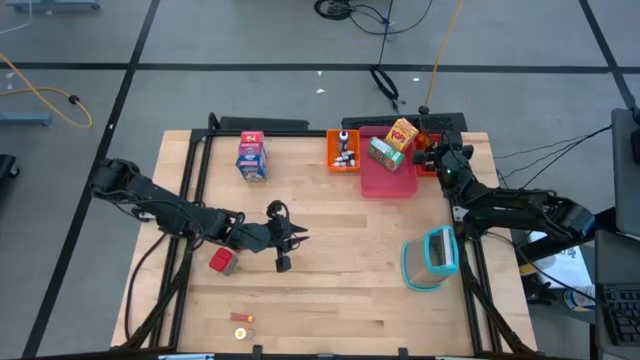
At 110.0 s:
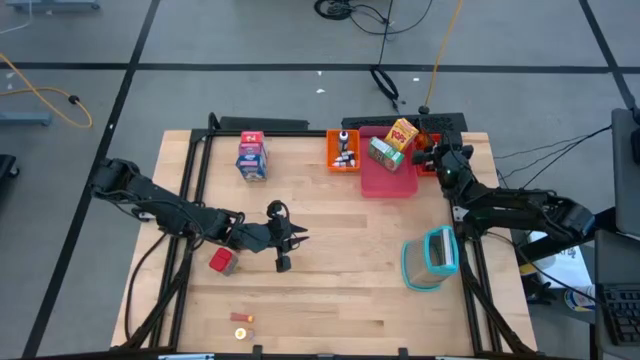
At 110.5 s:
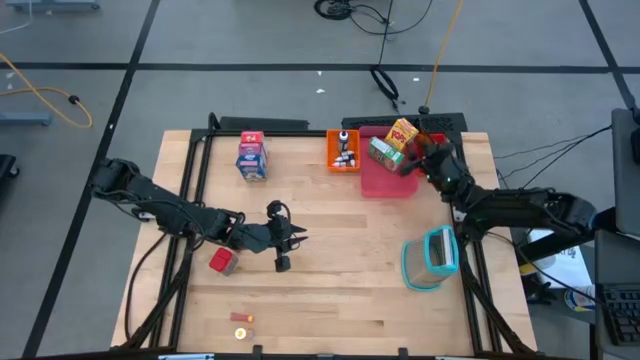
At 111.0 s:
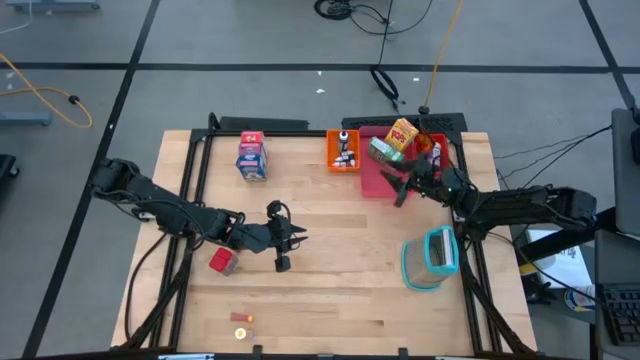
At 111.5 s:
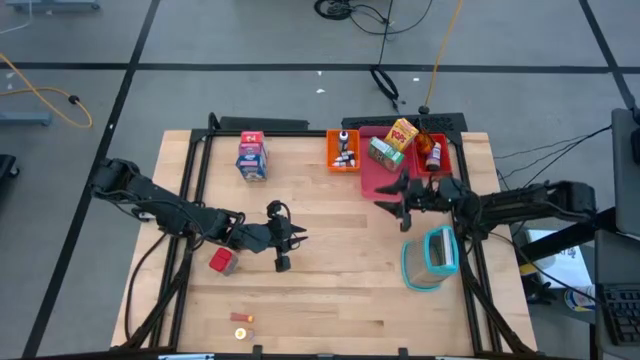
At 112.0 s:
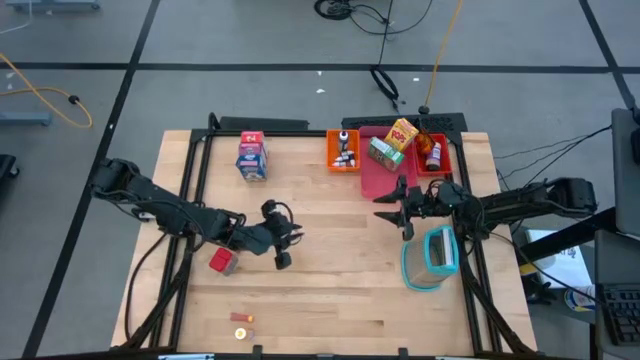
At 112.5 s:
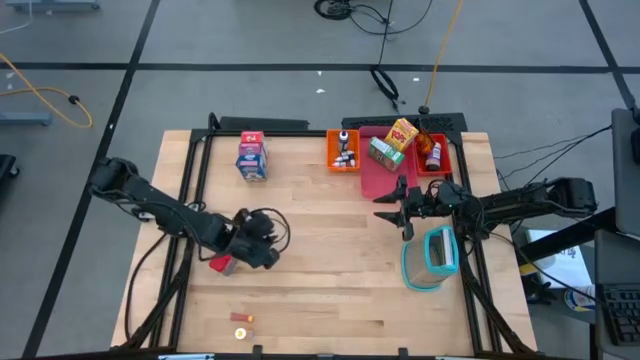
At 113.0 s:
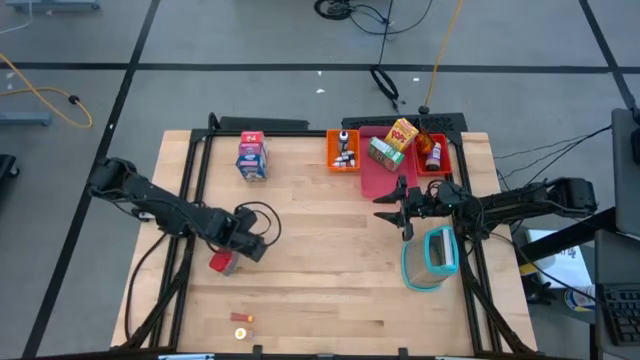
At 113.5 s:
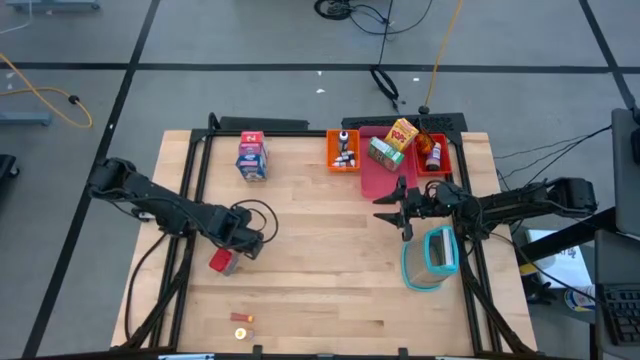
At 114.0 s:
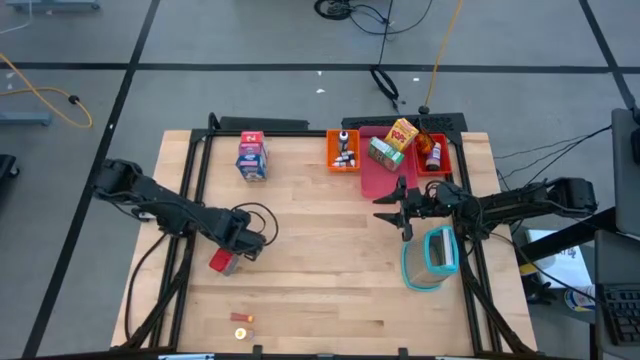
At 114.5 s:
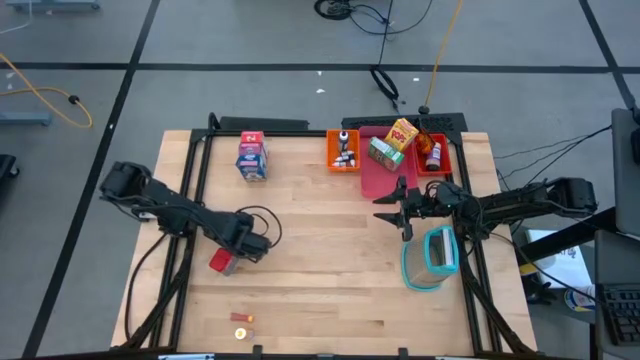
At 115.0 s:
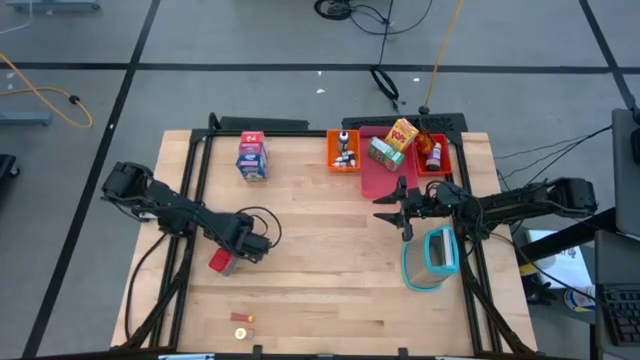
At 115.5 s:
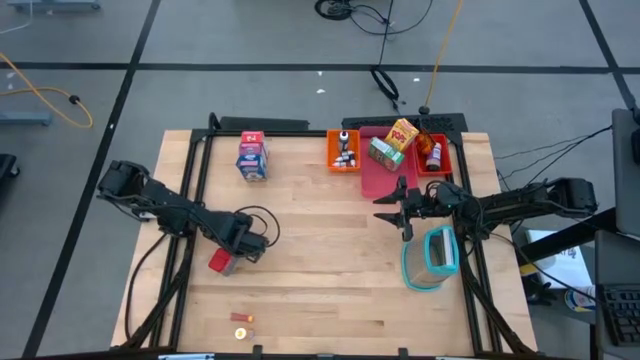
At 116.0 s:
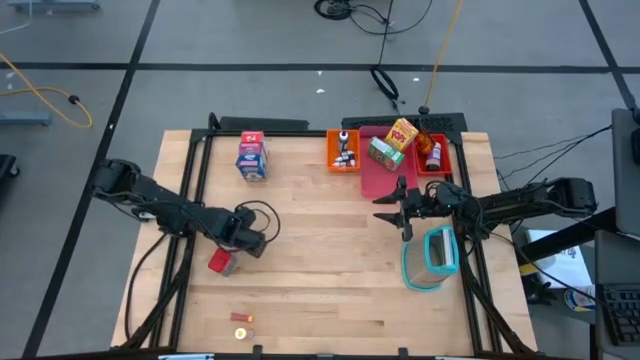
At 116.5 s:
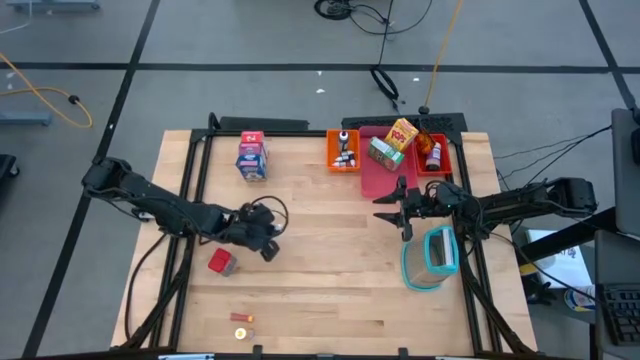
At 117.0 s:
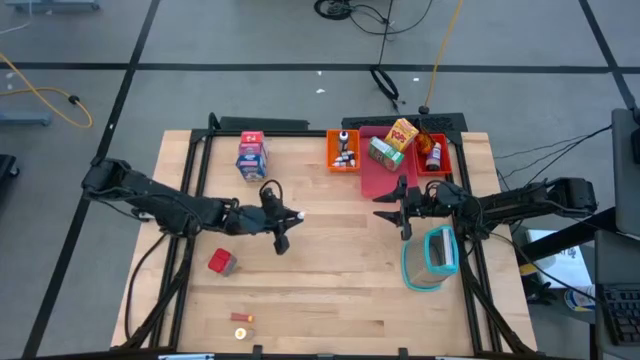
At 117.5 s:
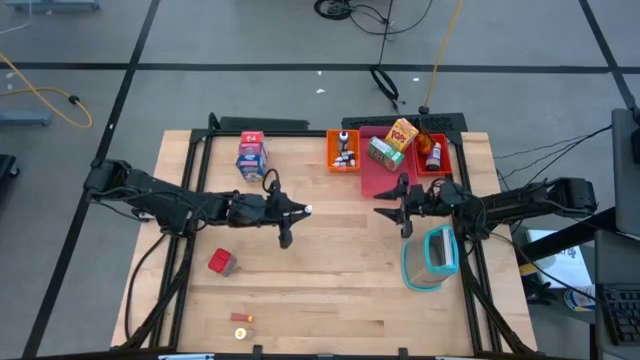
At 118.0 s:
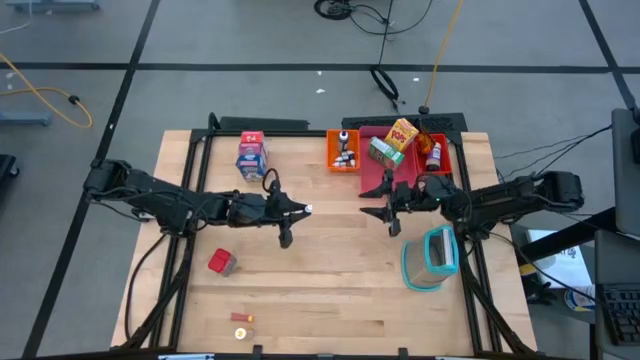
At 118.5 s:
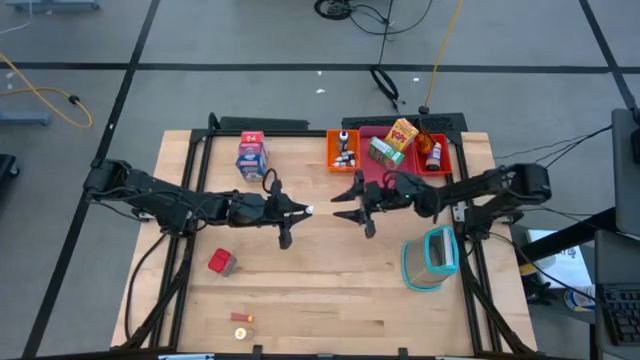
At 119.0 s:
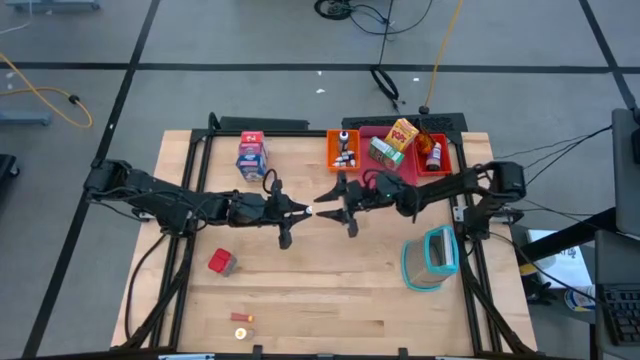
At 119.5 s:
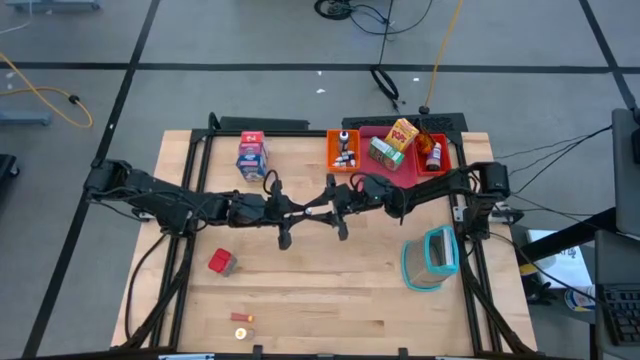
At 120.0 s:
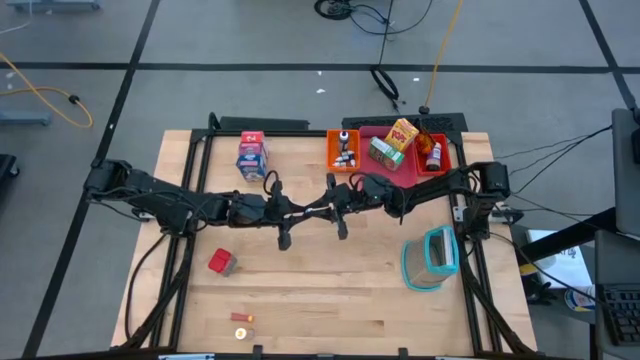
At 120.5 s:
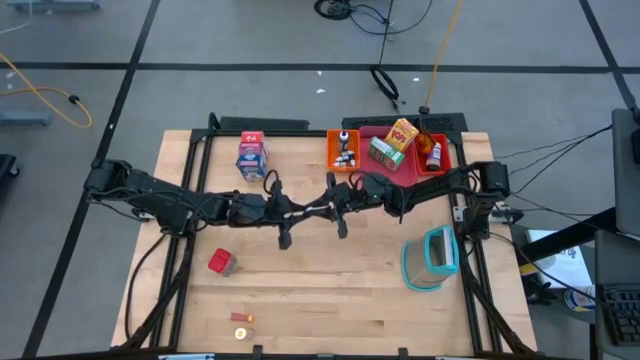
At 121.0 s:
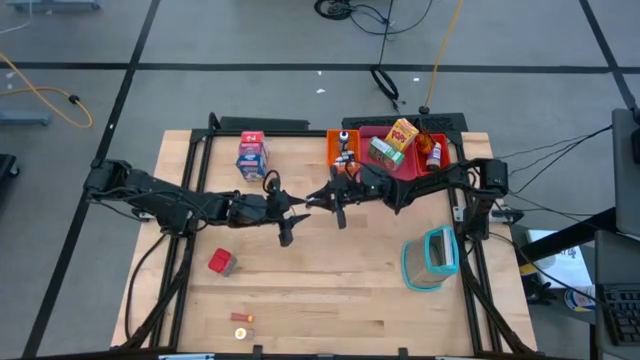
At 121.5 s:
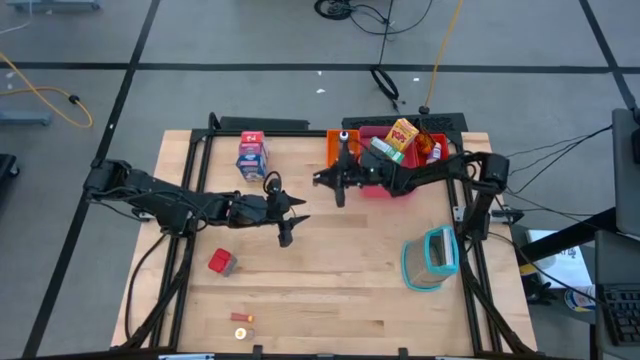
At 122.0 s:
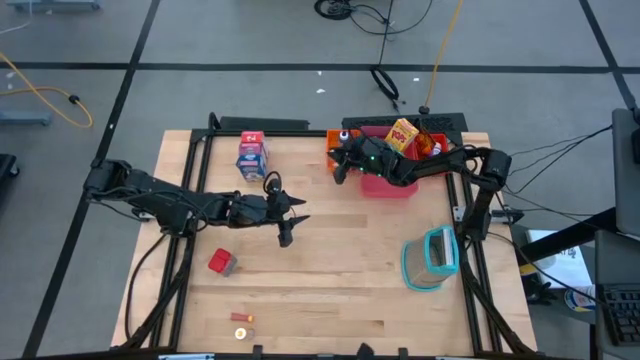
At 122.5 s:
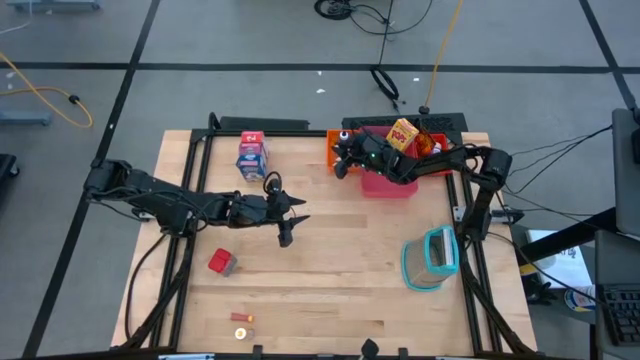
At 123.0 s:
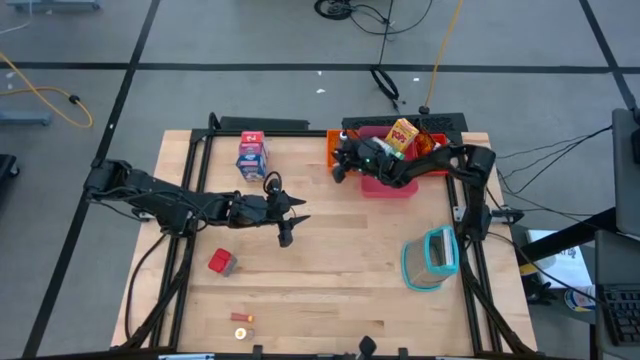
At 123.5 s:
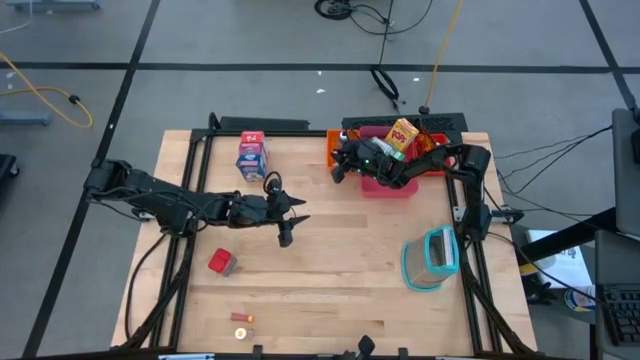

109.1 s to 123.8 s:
Task: Pick & Place Kitchen Items
Put the small orange food coloring bottle into the orange bin

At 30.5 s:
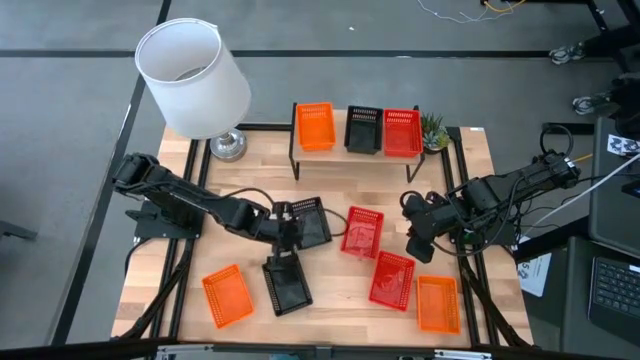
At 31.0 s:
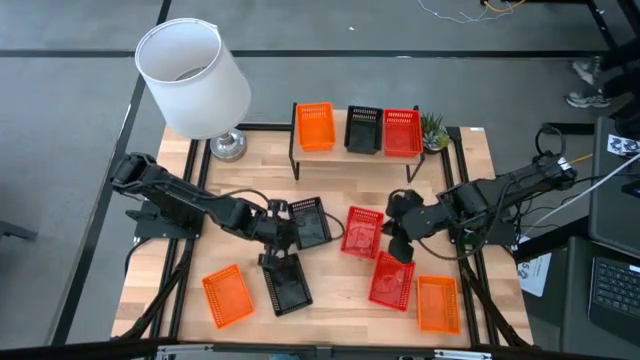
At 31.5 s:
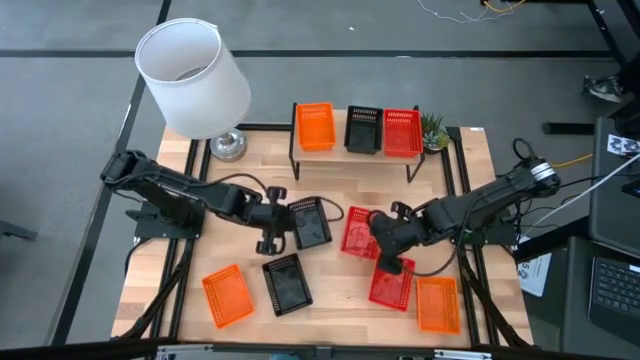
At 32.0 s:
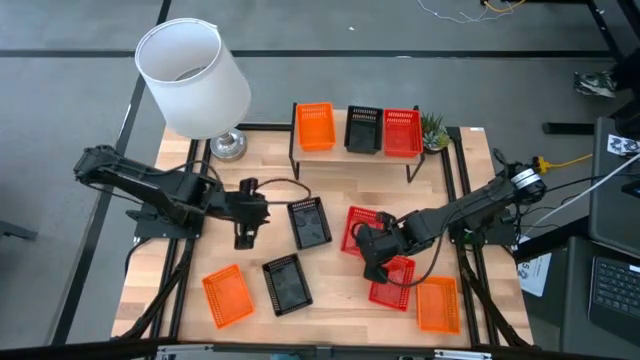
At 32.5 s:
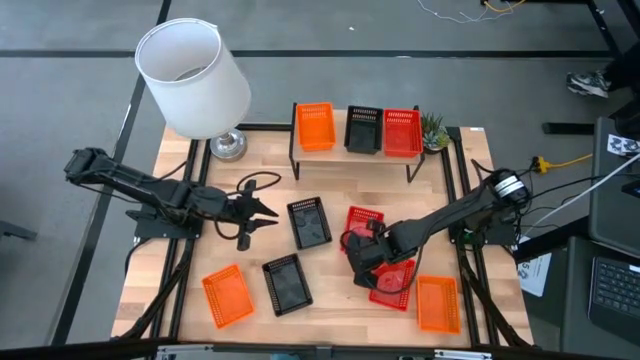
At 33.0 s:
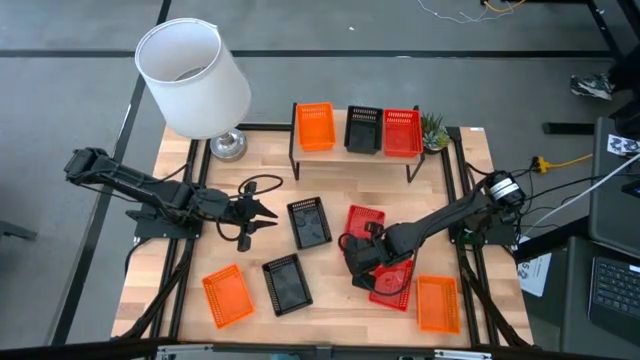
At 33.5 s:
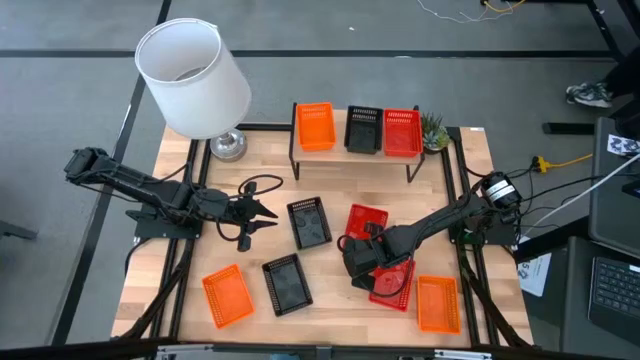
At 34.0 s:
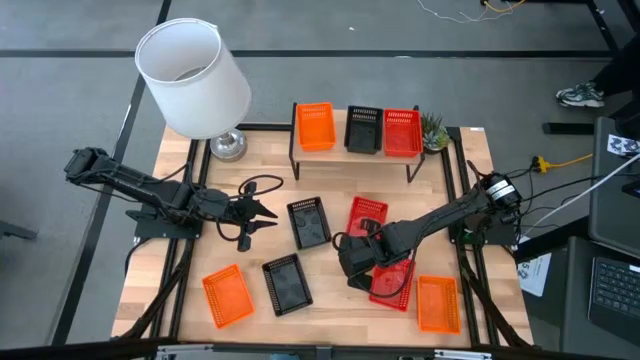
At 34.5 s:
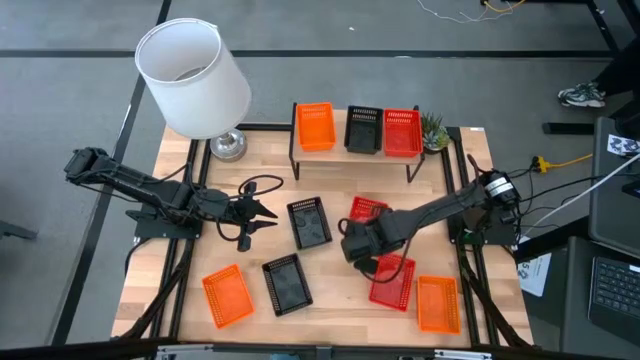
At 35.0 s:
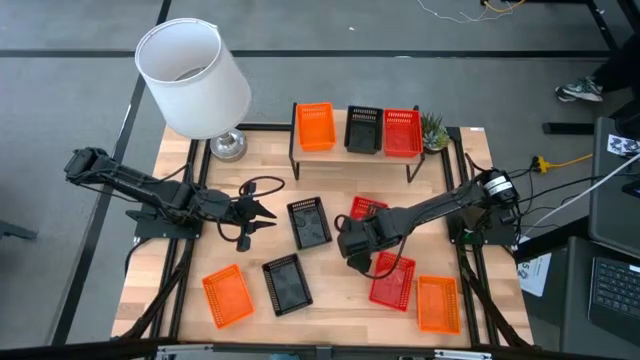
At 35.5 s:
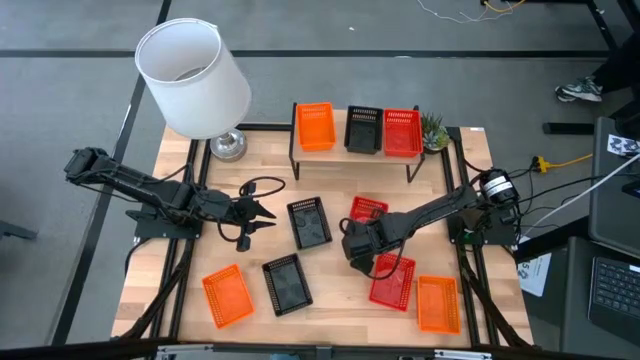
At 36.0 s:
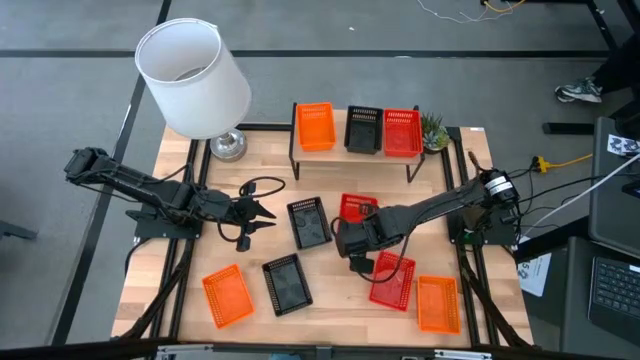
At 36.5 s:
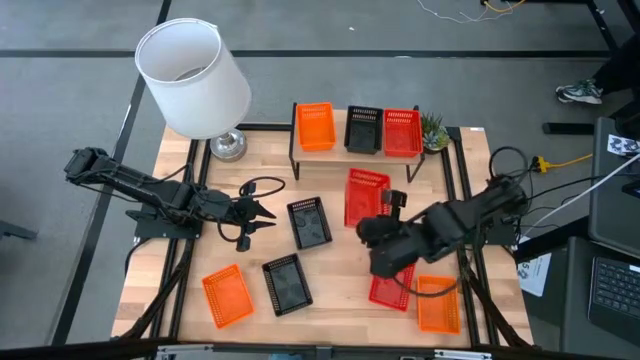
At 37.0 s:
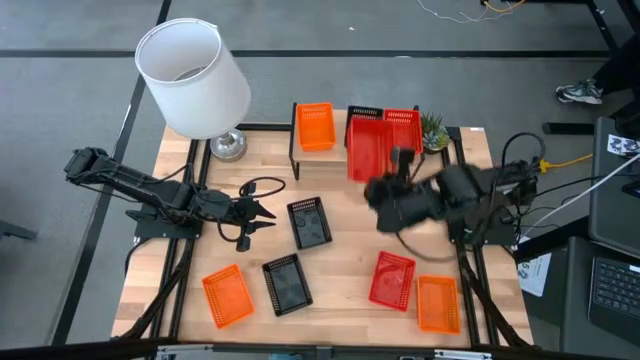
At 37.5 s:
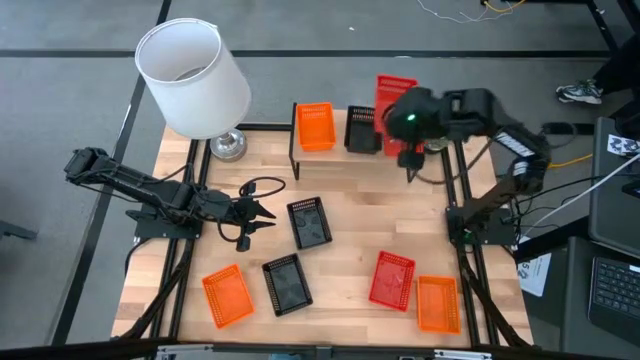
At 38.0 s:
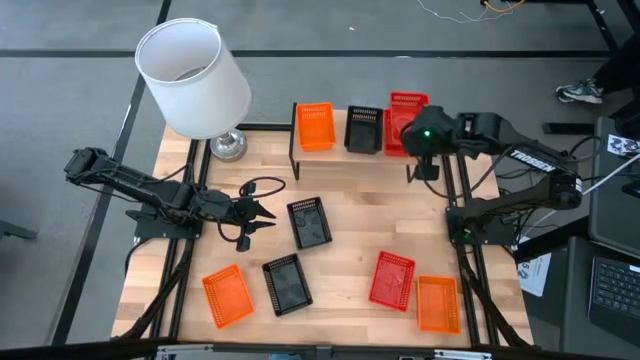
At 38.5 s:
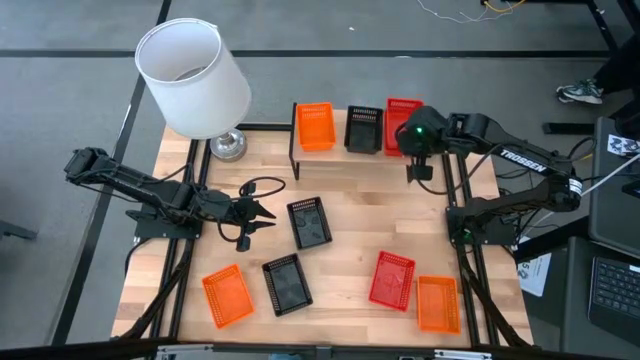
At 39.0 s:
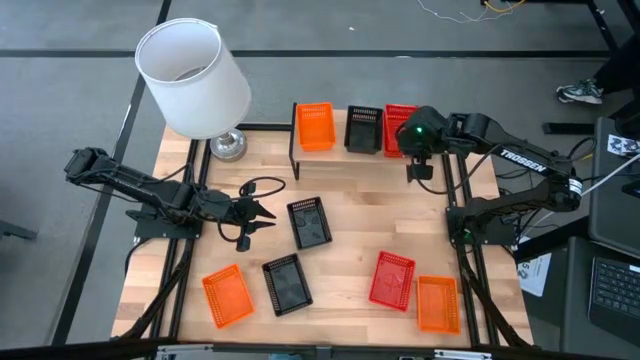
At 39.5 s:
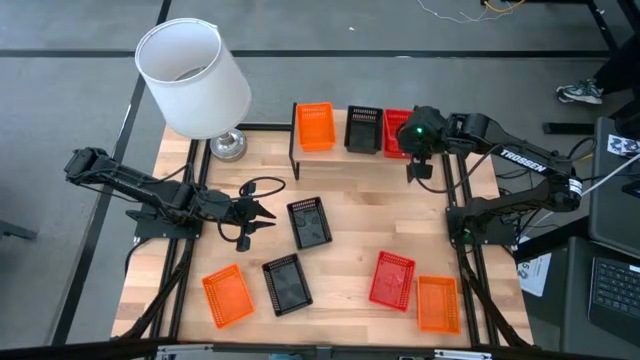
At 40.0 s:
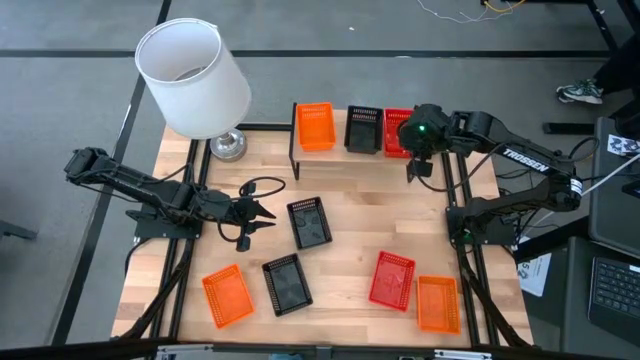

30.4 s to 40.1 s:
Task: Stack baskets on shelf by color
Stack the top red basket on the other red basket on the shelf
